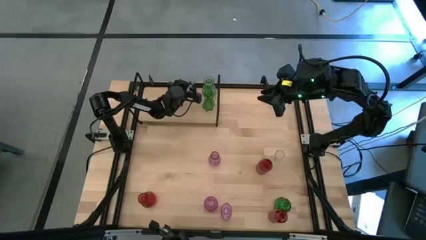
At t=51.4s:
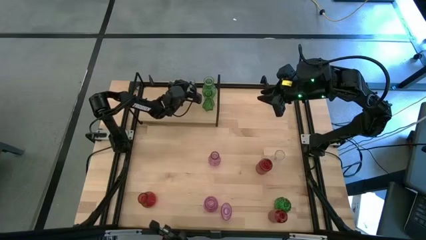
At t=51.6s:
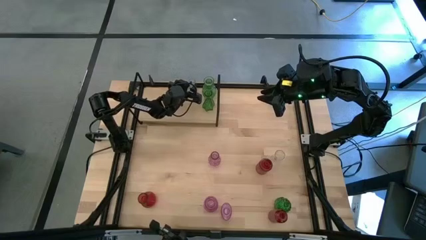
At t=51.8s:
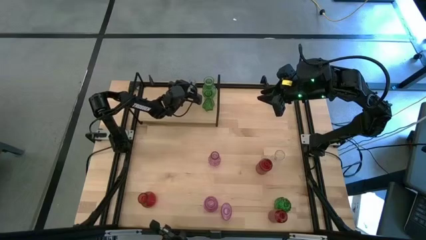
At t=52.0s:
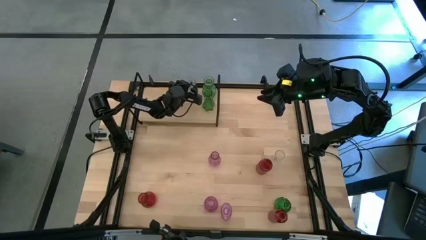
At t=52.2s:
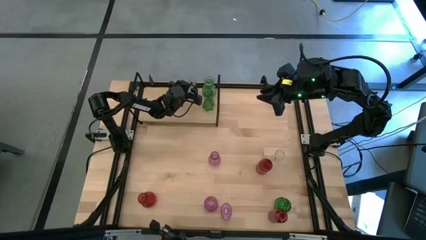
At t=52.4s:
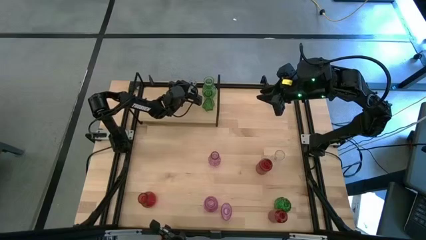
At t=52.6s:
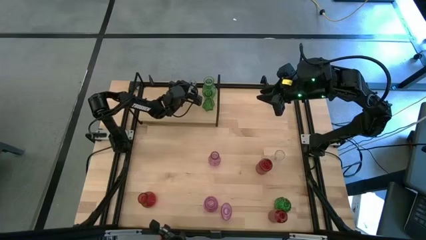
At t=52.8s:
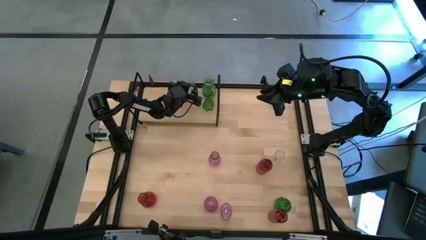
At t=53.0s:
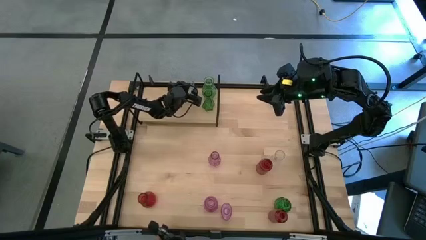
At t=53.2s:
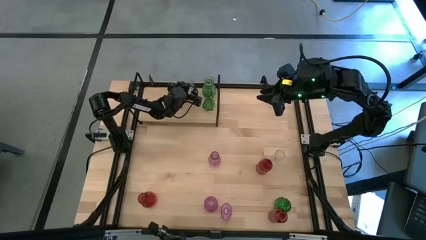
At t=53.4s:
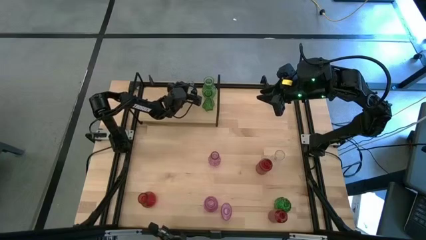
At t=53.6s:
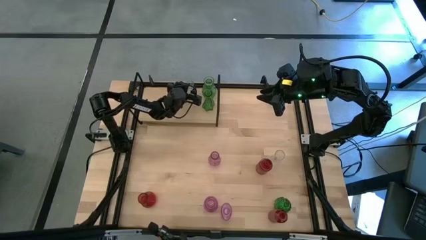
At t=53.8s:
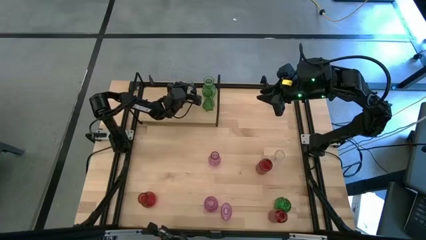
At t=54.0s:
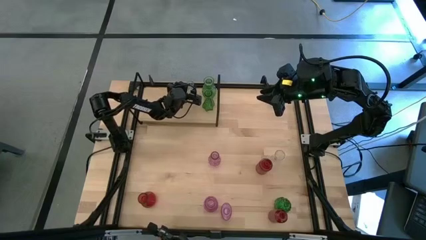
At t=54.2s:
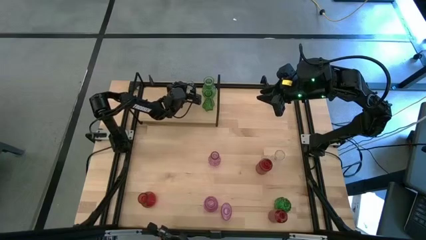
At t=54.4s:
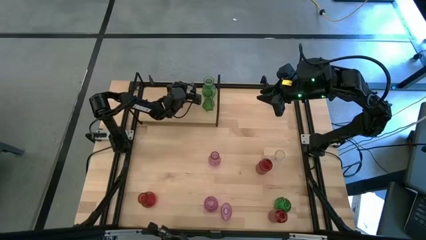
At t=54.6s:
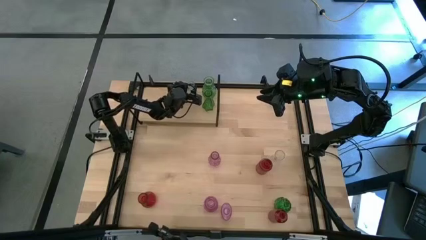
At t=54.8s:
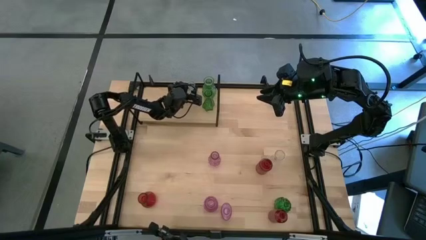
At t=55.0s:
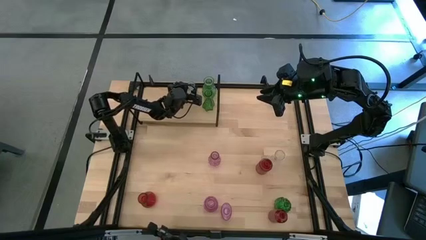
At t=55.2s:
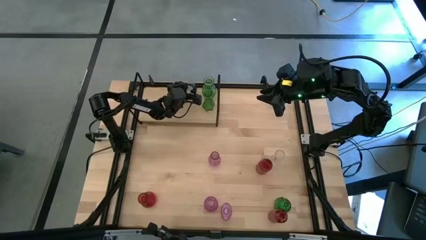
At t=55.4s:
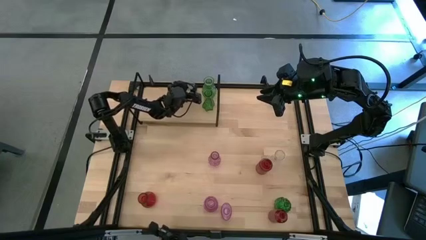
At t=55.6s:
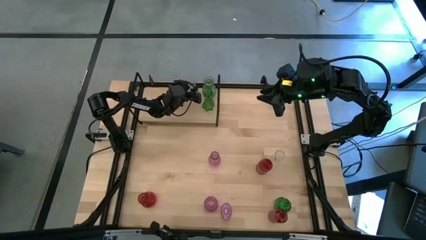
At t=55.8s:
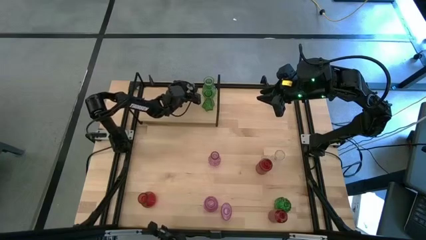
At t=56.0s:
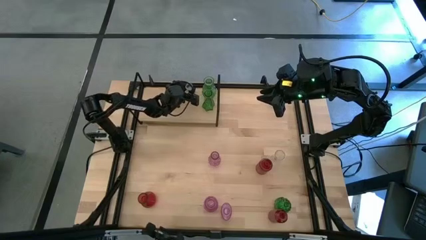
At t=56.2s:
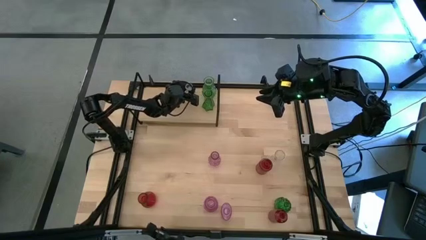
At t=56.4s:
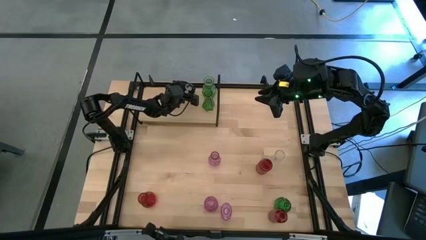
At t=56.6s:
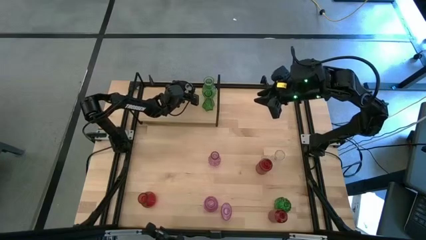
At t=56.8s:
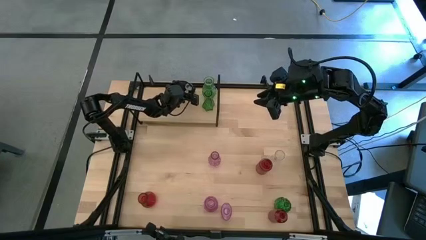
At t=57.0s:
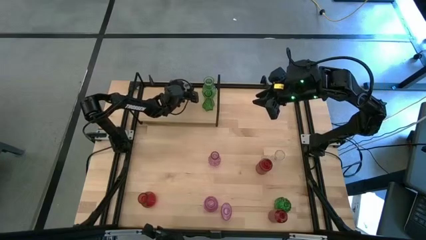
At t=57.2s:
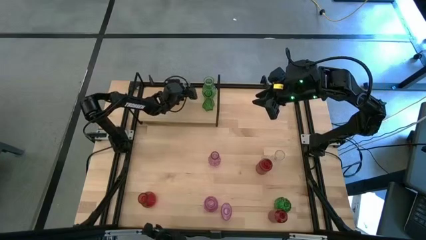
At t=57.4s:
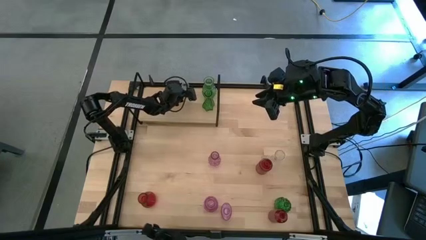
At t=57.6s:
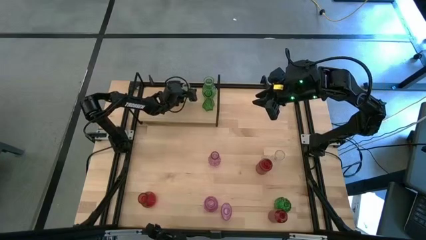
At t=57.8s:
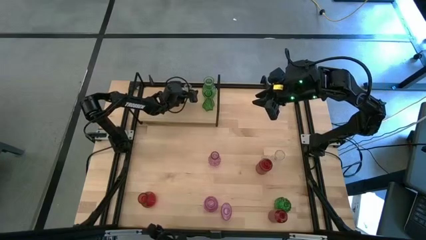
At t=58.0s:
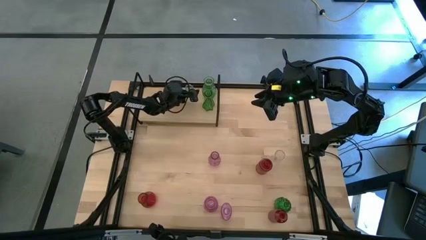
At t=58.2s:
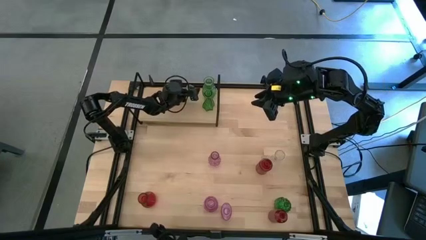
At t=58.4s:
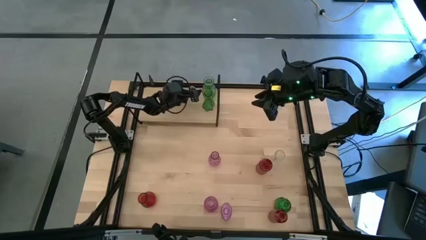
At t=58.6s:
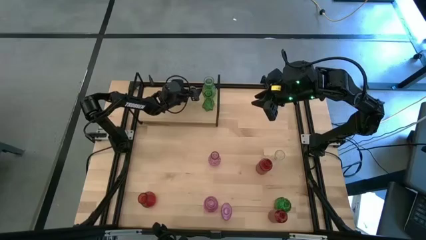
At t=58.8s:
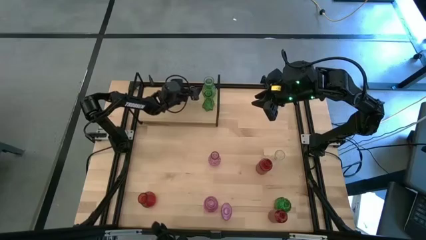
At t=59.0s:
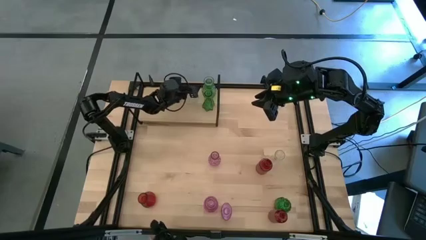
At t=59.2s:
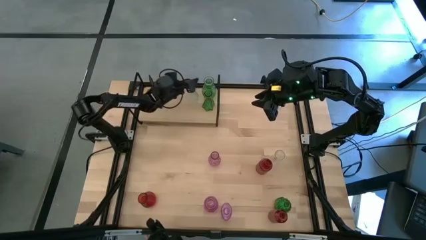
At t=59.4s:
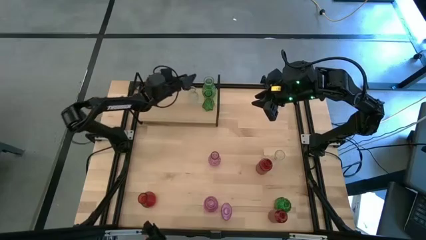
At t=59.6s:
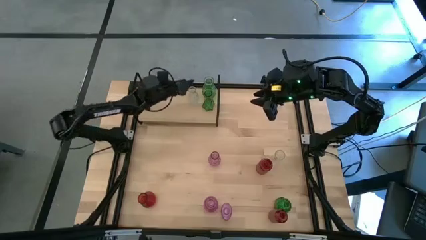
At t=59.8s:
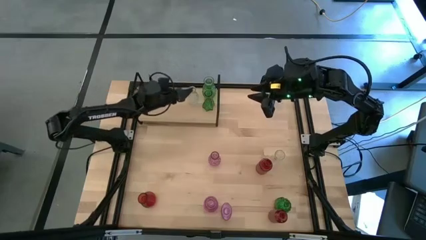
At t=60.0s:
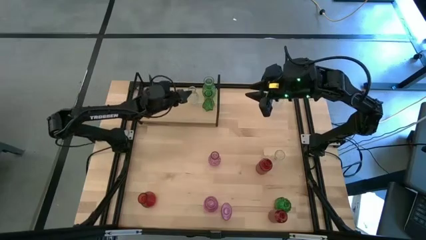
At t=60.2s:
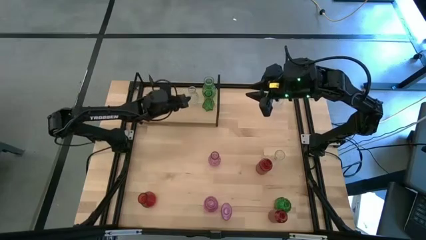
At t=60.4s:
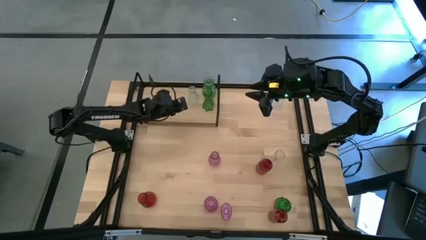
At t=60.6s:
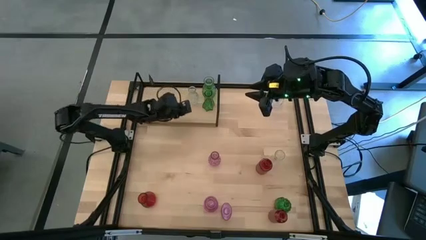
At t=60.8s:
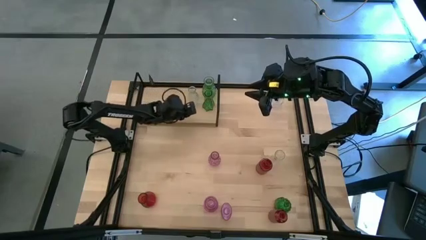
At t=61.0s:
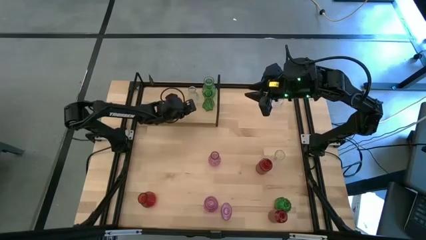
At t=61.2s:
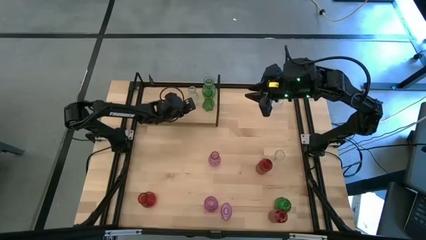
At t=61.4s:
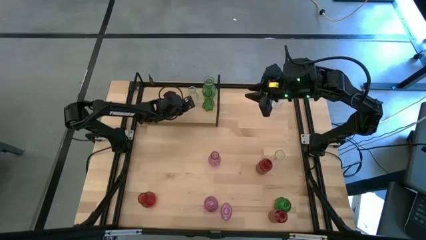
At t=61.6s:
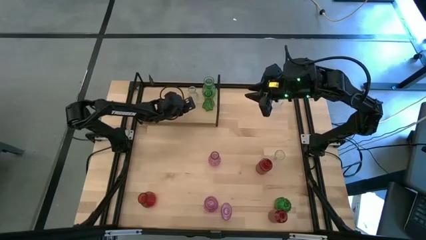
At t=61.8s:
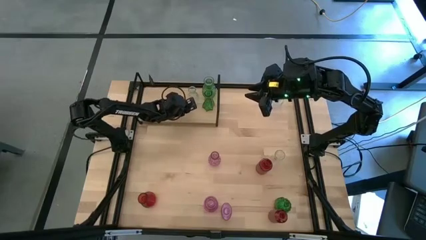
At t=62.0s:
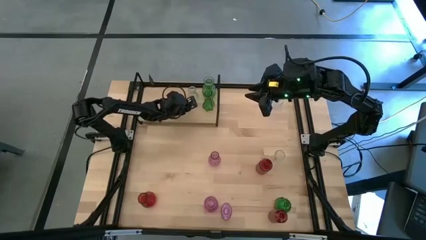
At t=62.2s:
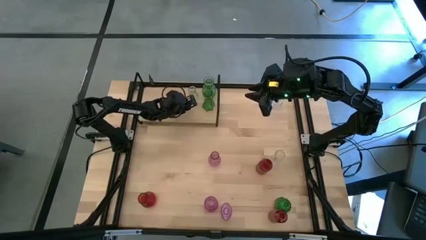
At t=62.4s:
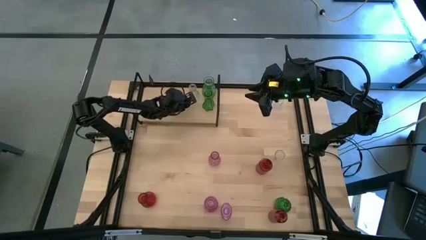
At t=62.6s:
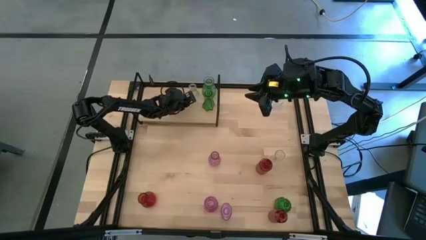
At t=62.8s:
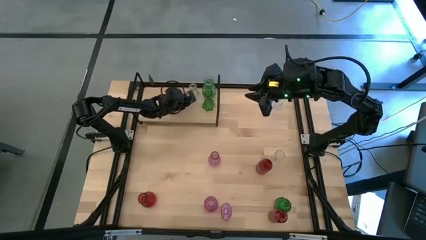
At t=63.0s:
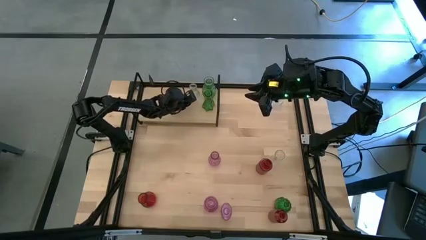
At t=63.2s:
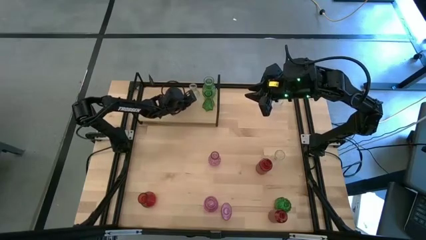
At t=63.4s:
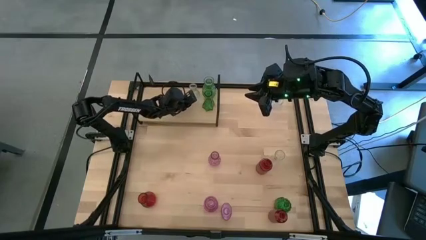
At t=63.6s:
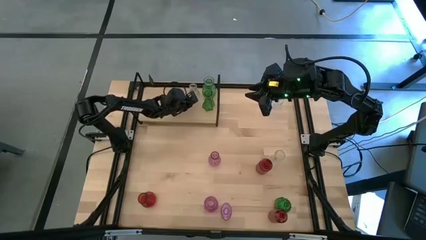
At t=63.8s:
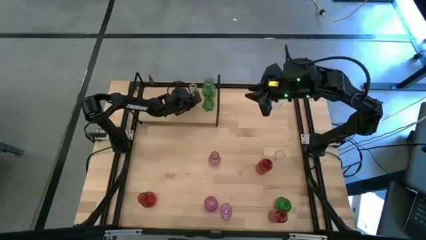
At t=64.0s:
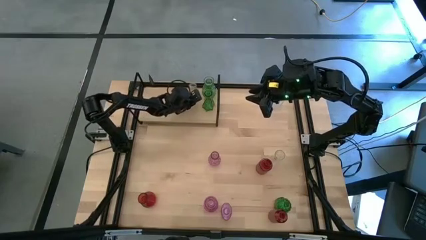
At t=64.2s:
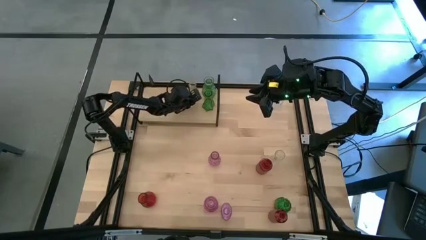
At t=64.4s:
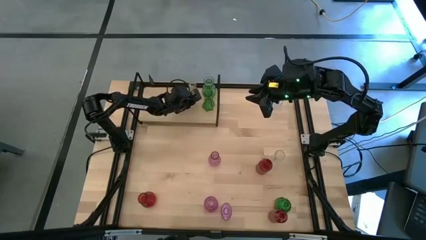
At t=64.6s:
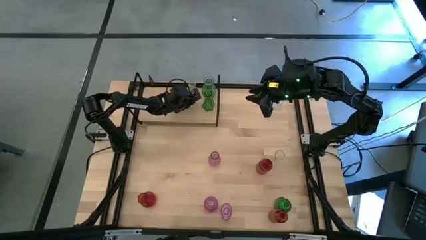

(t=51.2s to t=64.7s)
Task: sort vases onto shelf
Put the bottom left transparent vase on the shelf

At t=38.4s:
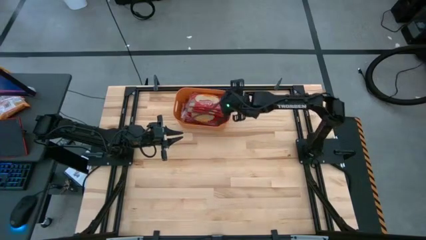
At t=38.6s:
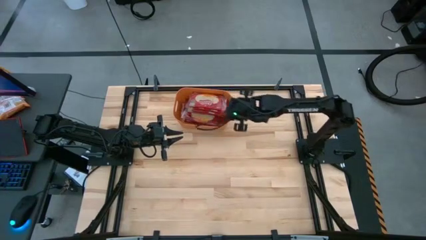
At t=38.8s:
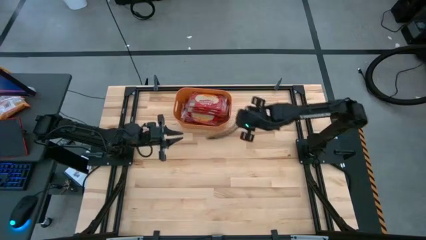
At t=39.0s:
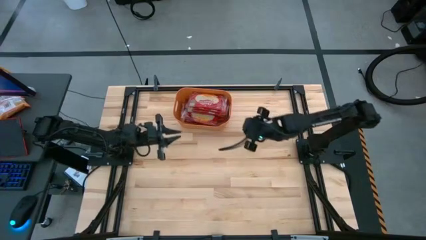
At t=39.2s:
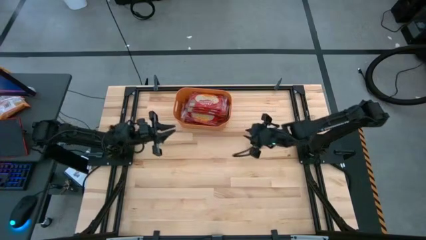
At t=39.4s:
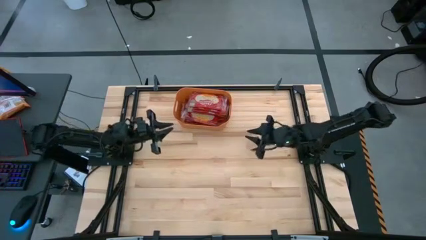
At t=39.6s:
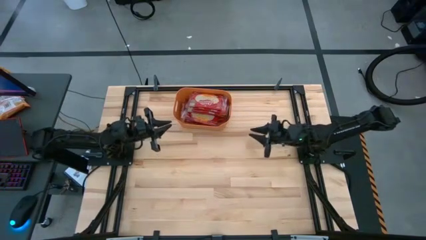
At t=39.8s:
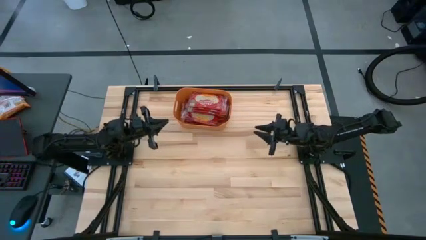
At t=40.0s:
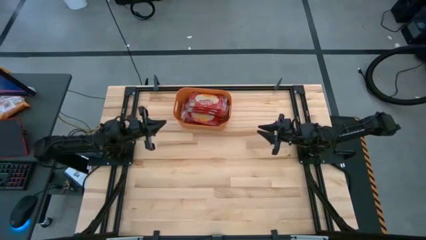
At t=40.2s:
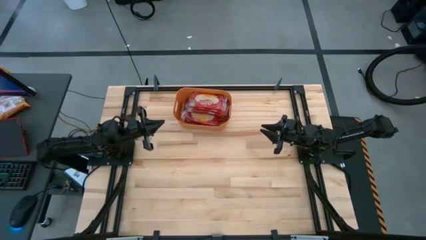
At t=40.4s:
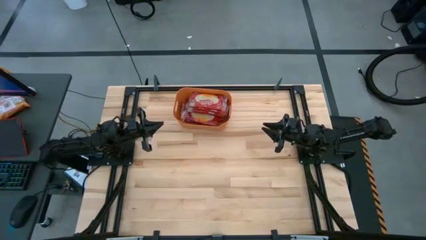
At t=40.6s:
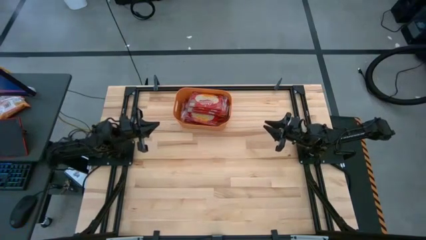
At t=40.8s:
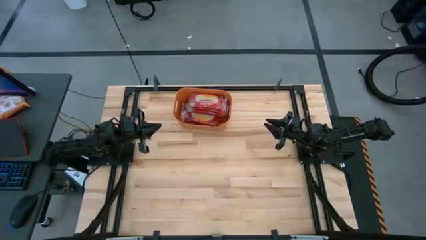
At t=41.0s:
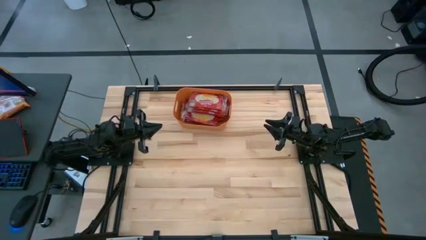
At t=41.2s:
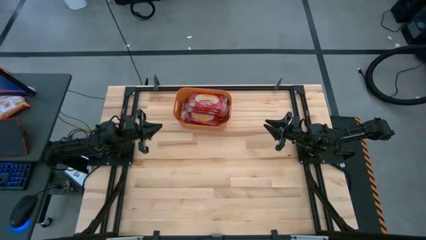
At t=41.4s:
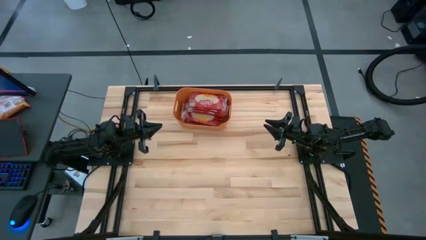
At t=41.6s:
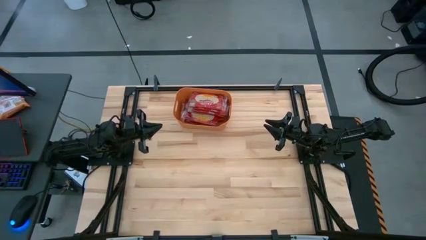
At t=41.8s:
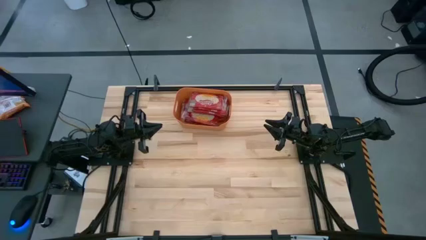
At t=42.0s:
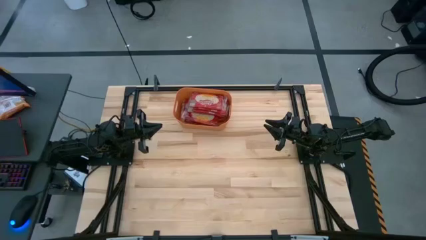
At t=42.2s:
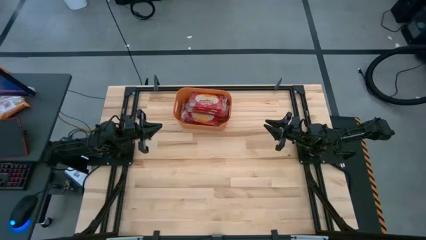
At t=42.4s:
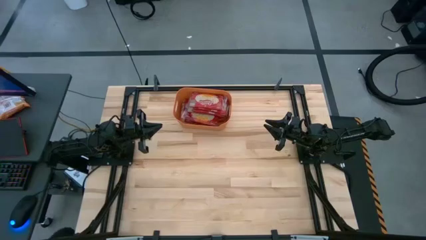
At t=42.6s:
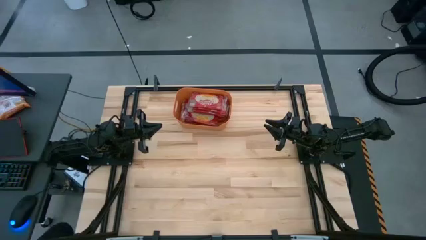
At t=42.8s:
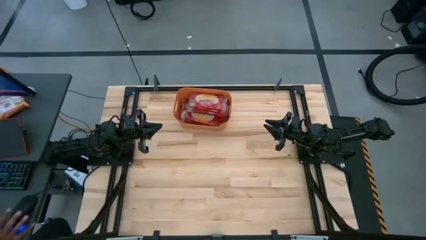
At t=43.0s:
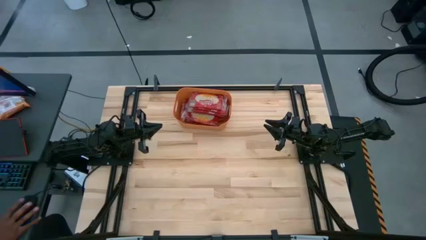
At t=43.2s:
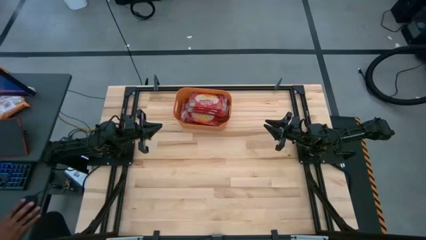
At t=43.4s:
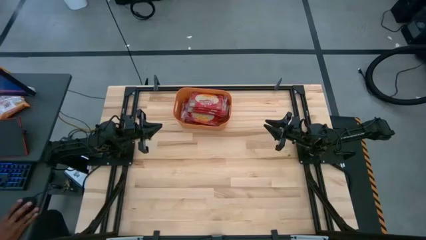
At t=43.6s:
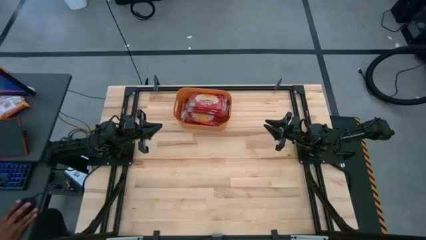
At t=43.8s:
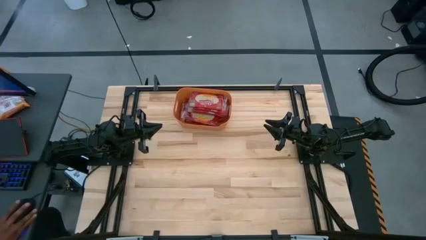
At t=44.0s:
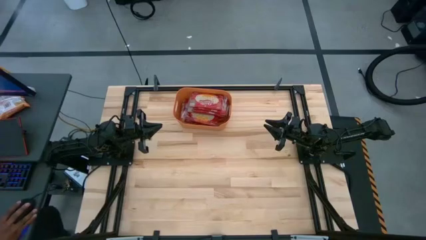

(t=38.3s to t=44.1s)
Task: Sort popcorn bags into baskets
Return to Home Position
